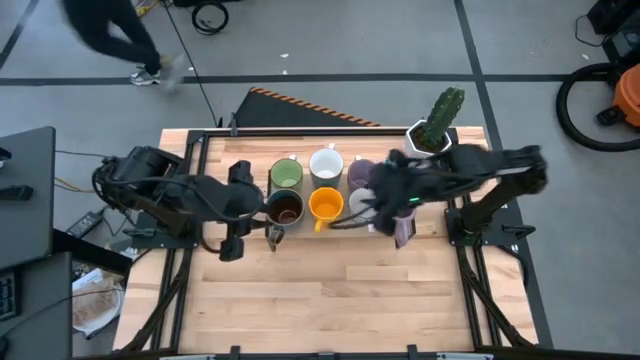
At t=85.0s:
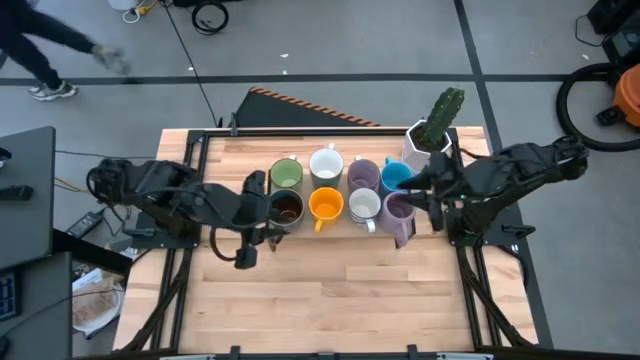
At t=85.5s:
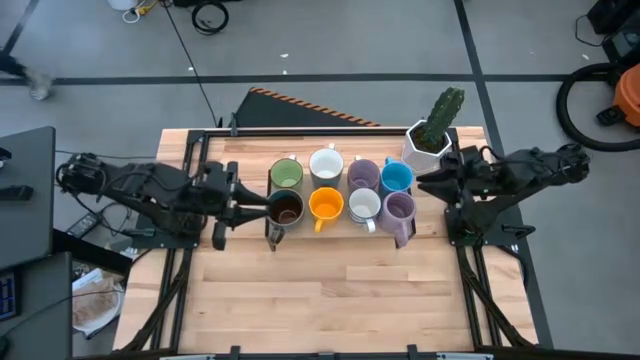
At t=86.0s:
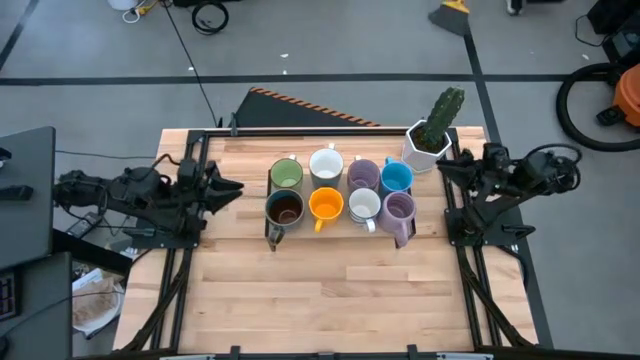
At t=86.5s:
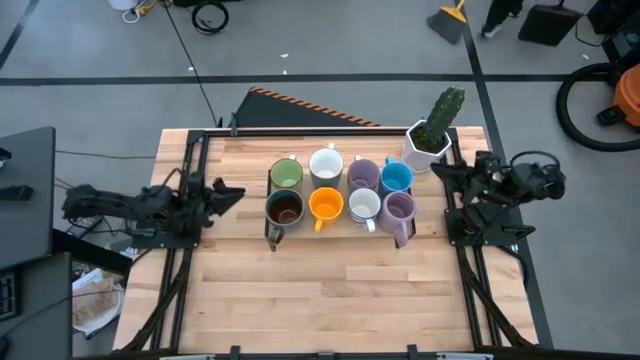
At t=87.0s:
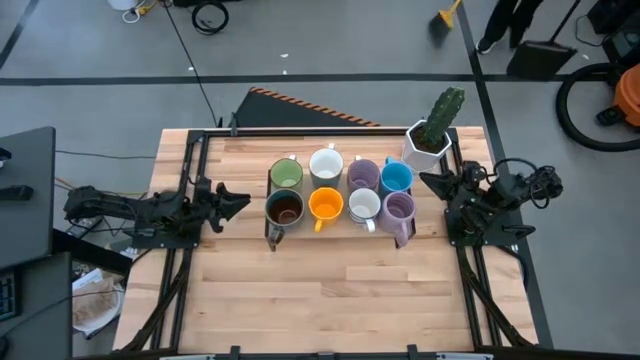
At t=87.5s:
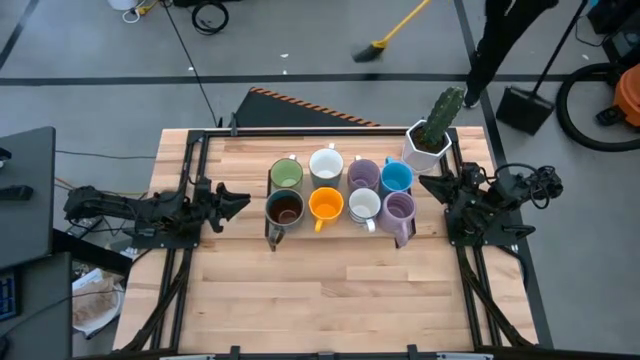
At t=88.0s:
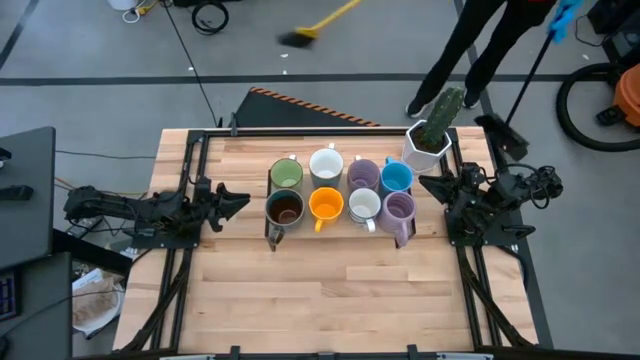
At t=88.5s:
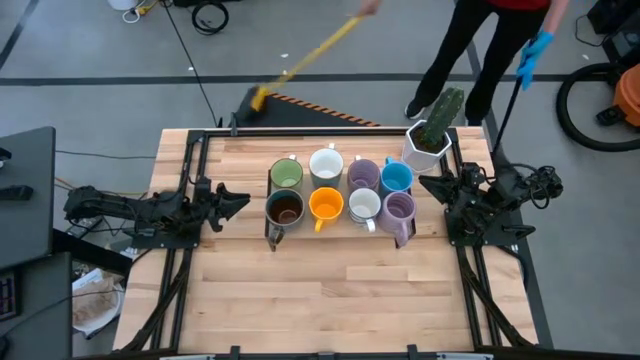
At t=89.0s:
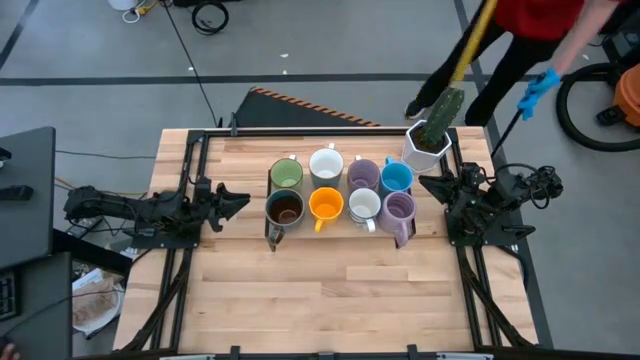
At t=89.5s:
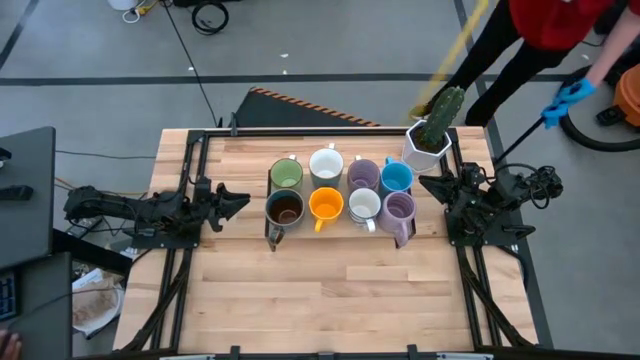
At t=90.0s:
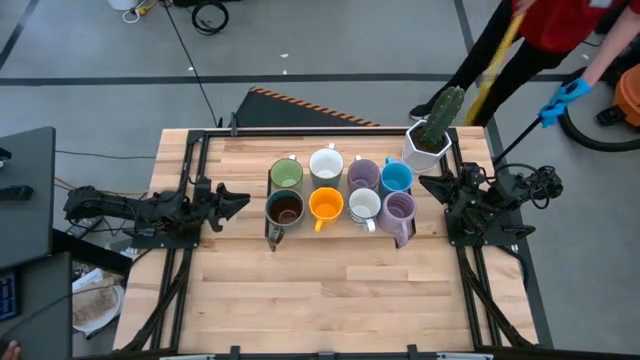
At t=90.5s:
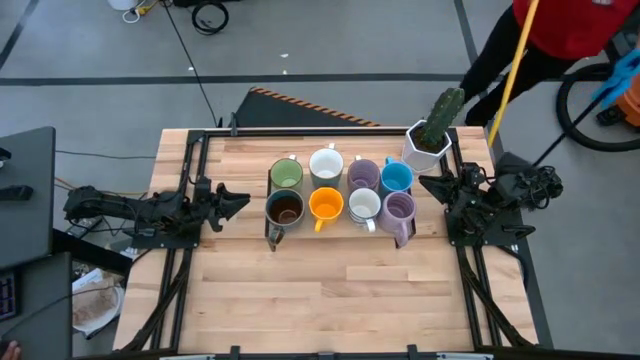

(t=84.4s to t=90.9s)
Task: Place coffee mugs
Return to Home Position

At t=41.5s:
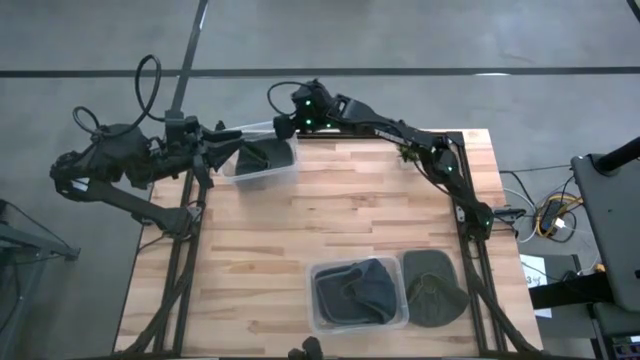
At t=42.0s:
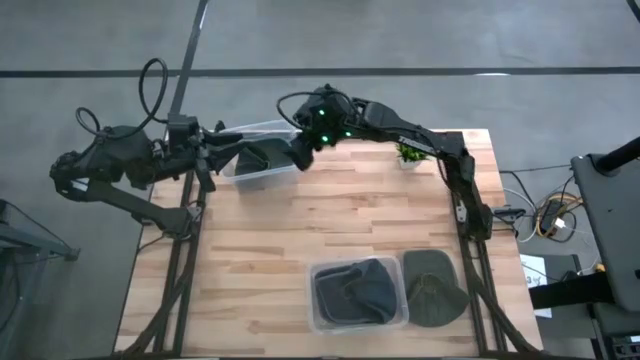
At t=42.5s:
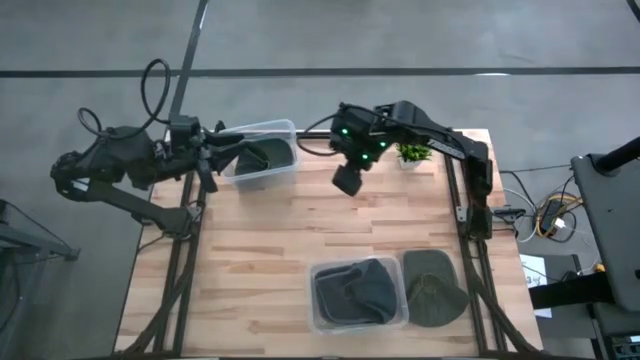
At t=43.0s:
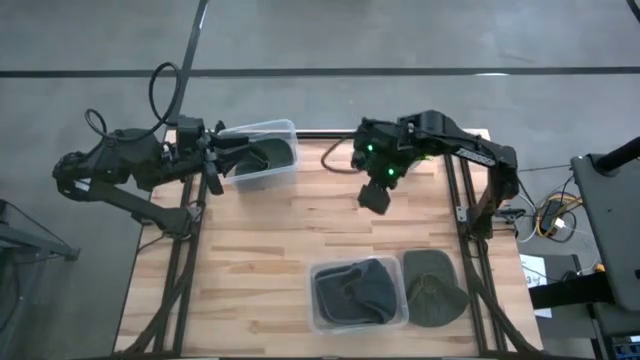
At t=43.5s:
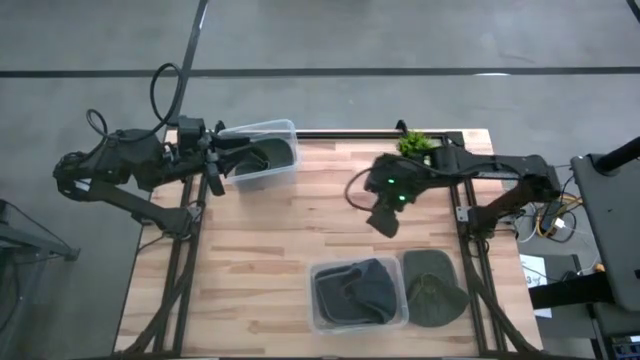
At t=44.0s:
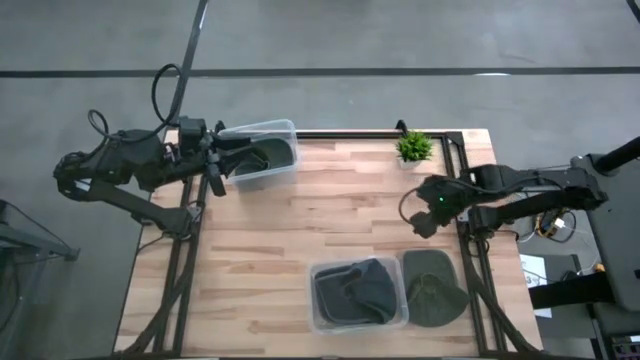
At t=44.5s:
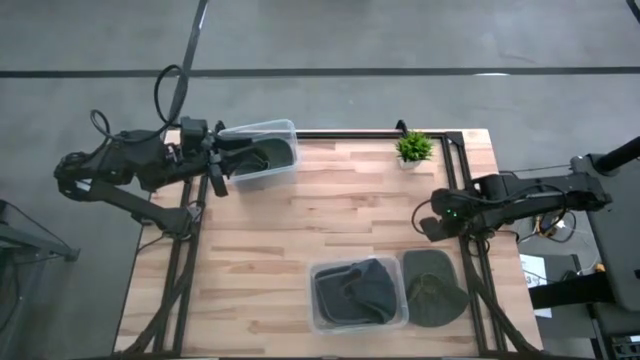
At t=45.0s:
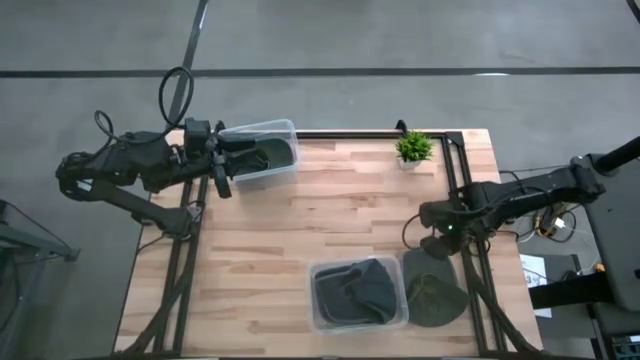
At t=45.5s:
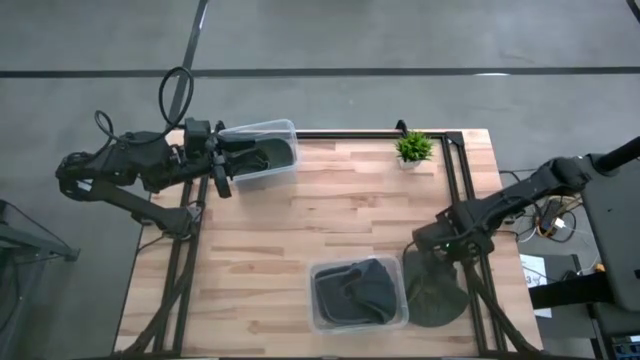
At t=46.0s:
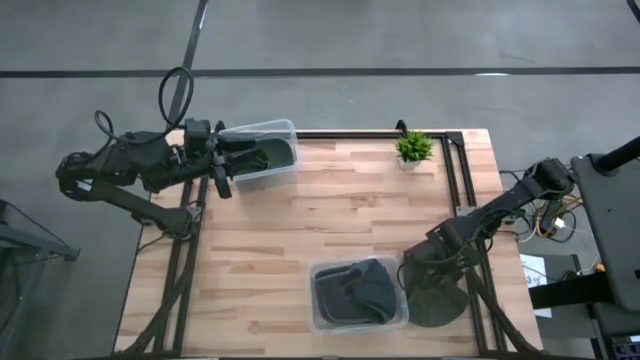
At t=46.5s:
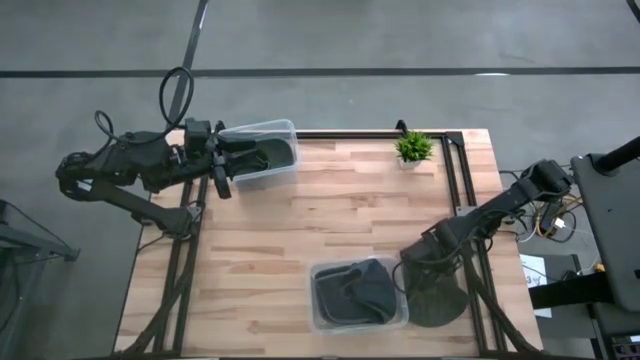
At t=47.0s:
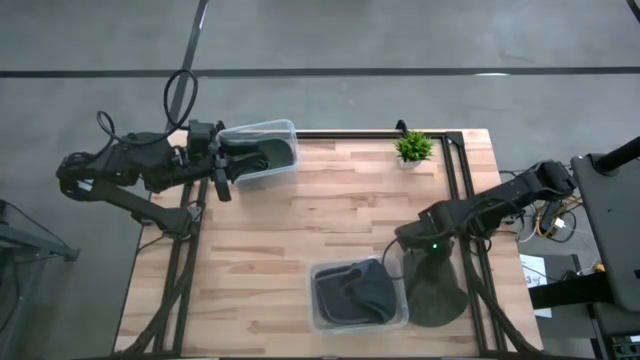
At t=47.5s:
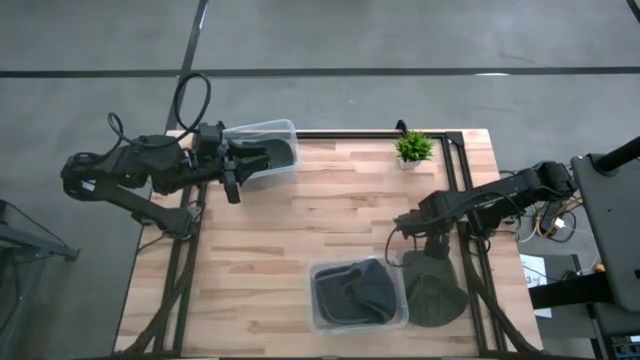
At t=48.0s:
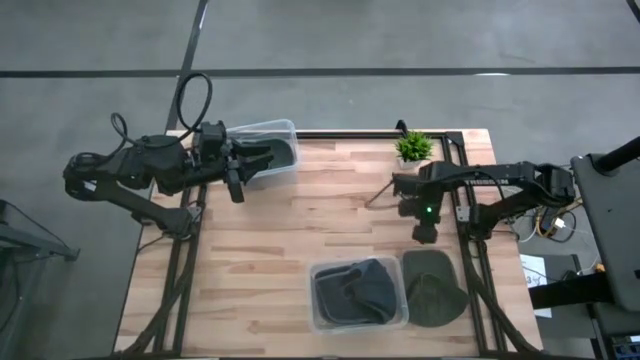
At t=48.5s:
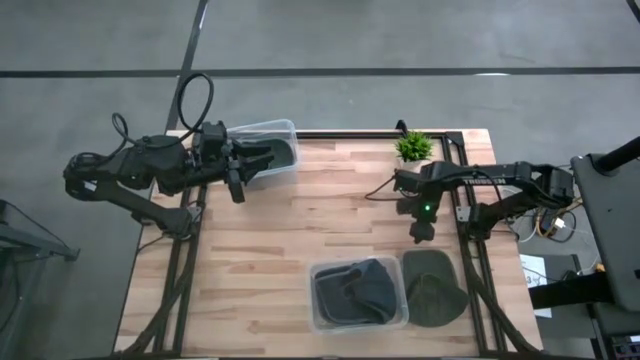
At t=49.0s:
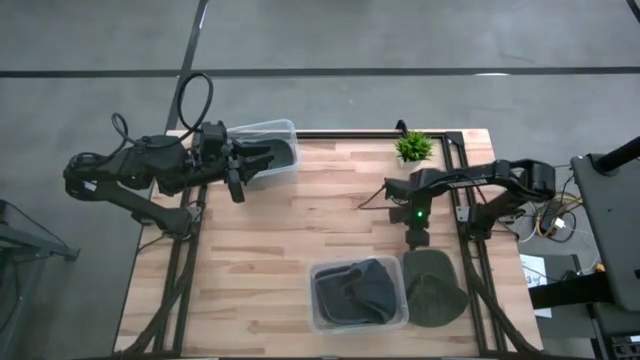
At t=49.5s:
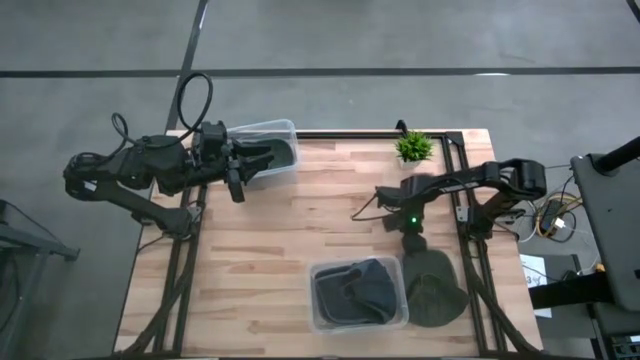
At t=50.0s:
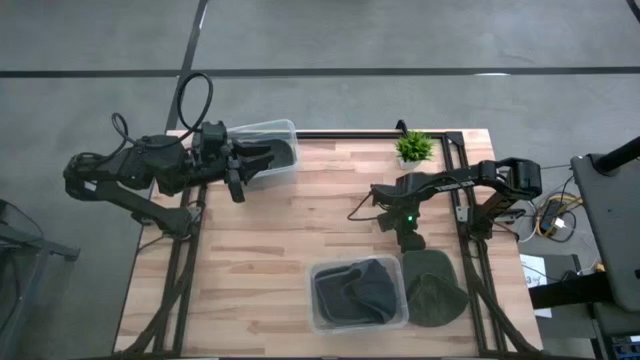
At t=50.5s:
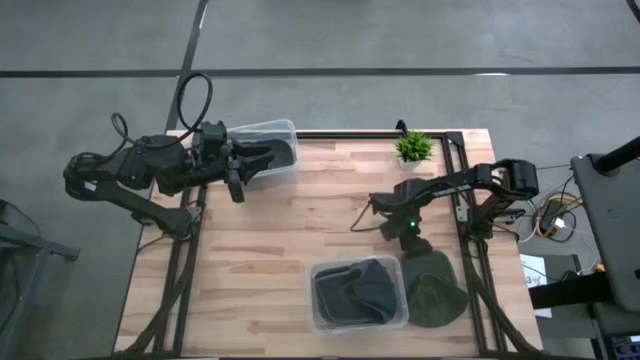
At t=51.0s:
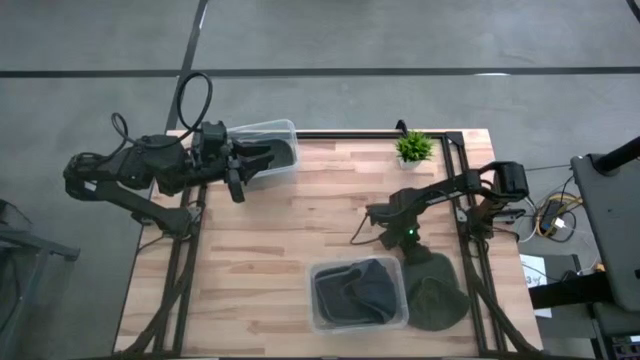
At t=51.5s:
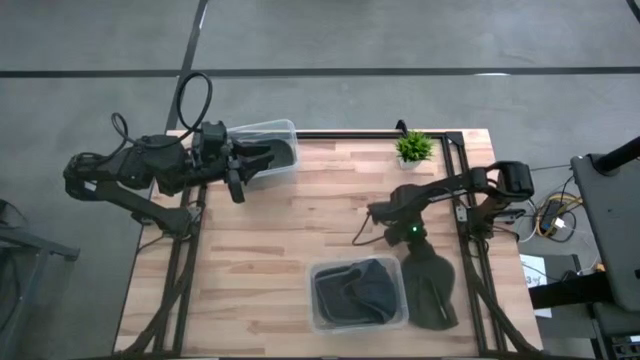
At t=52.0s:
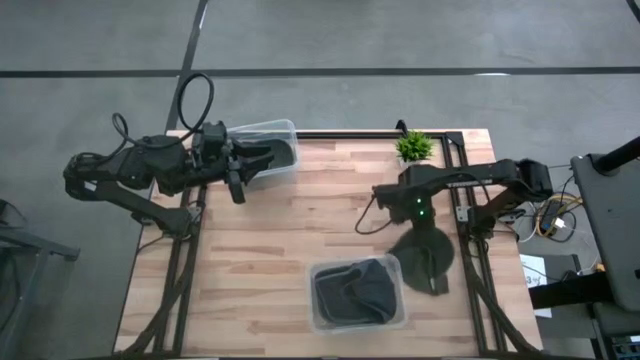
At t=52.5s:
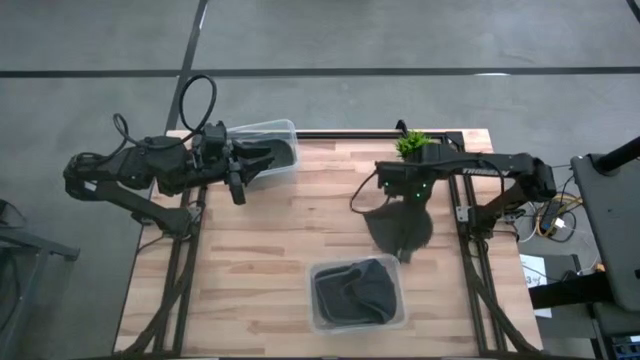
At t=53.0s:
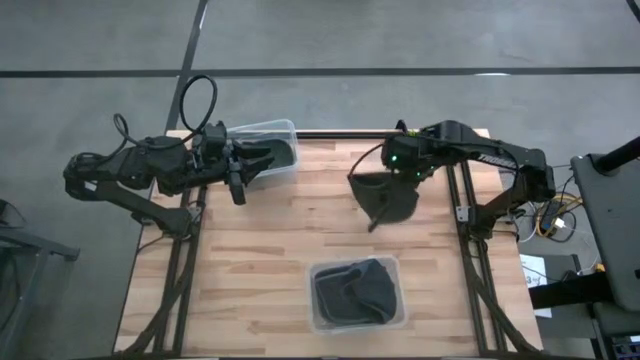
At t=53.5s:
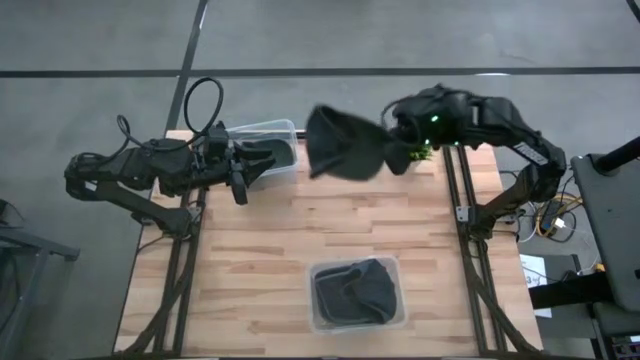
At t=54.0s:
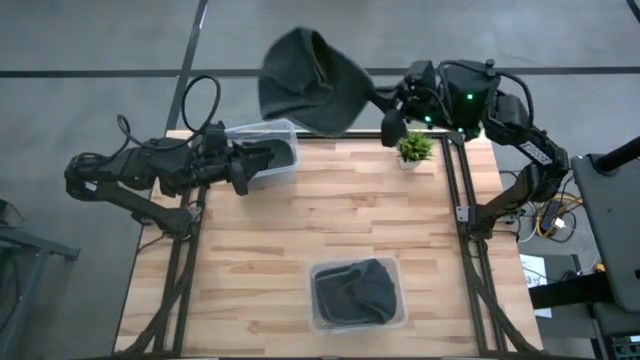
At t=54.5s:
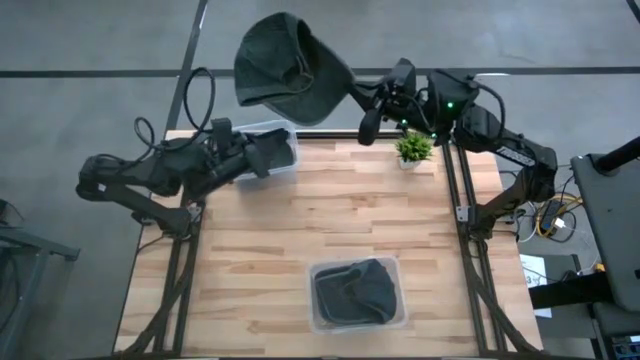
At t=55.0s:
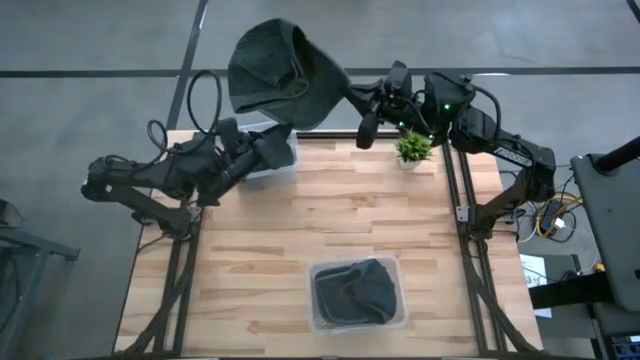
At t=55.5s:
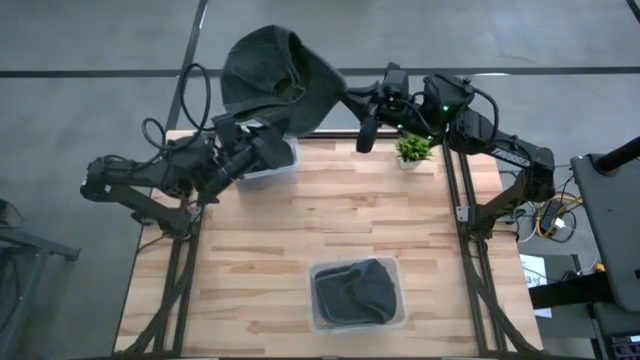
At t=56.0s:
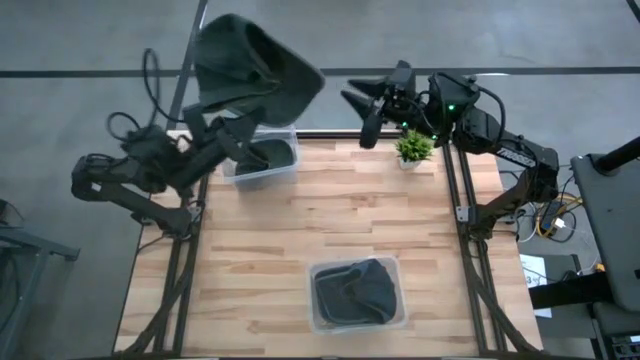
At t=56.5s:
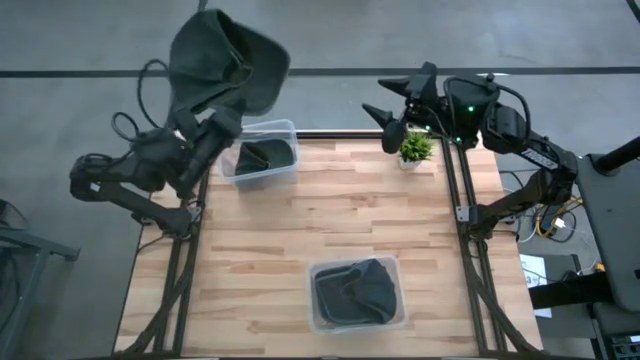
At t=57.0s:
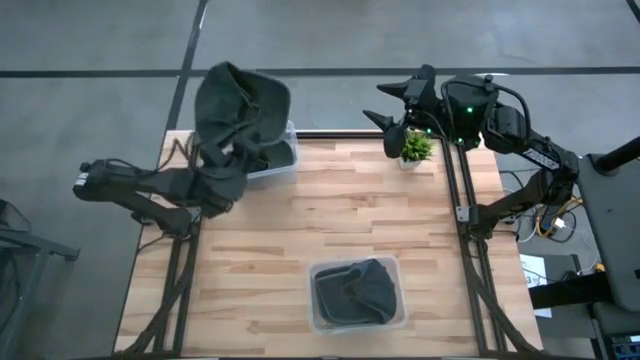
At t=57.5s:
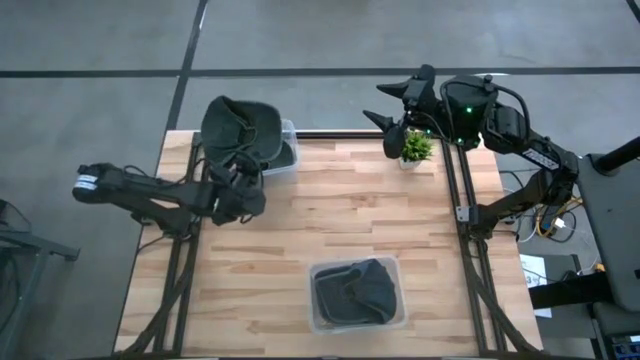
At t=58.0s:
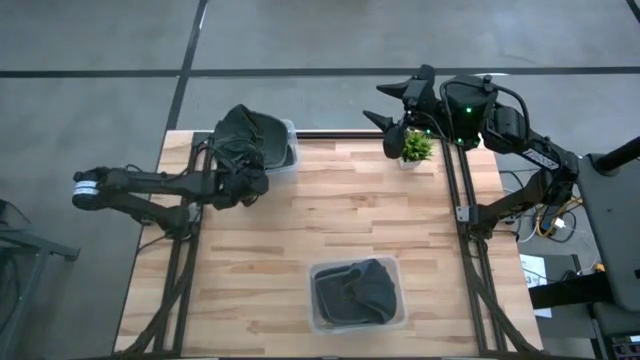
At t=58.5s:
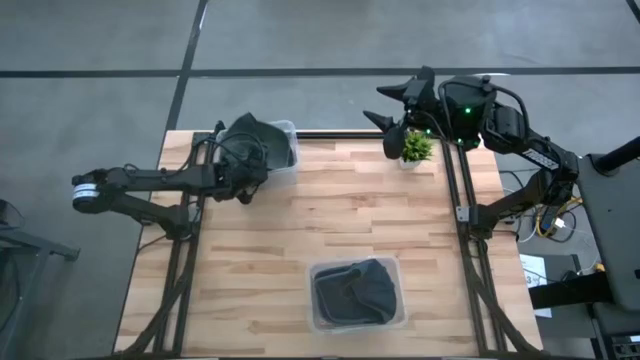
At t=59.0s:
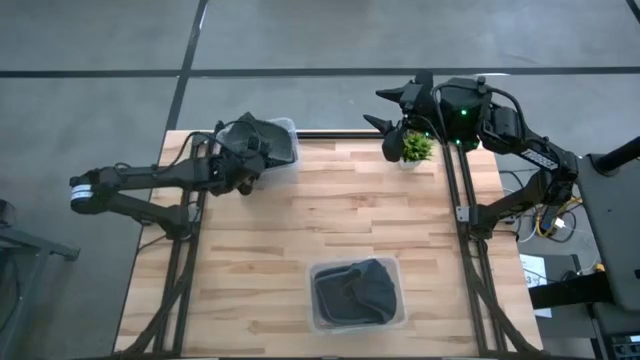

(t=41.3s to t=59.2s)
Task: Pick & Place hat
Put the black cap into the top transparent bin
